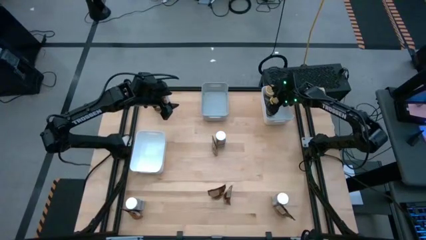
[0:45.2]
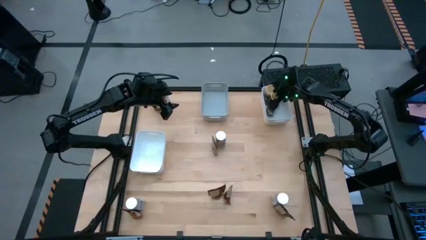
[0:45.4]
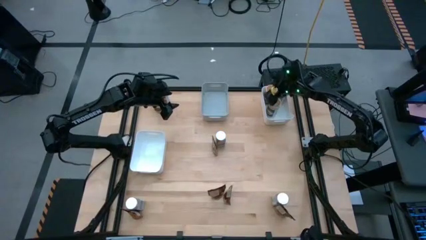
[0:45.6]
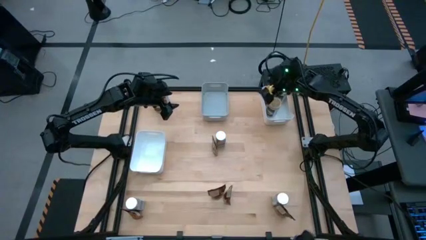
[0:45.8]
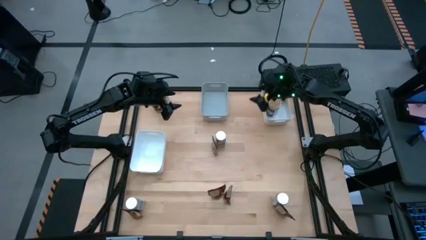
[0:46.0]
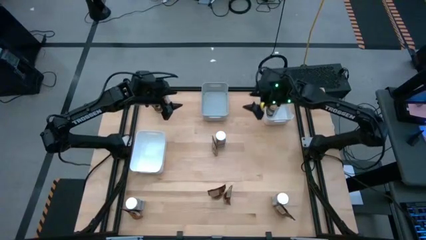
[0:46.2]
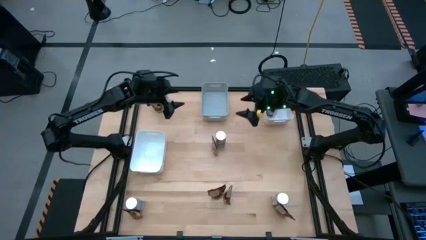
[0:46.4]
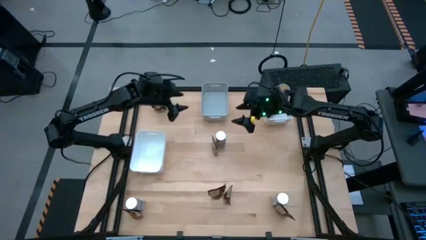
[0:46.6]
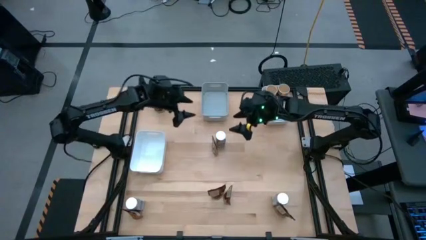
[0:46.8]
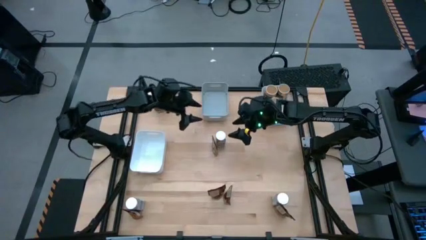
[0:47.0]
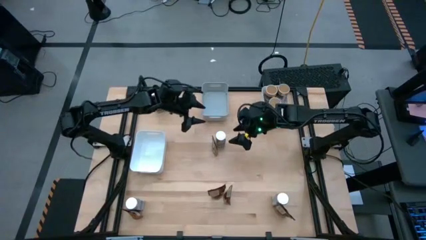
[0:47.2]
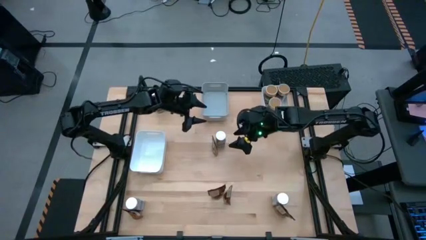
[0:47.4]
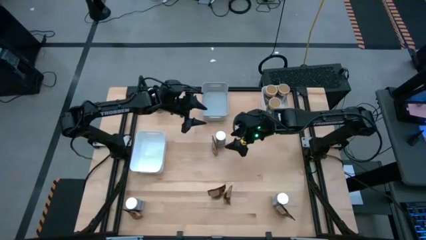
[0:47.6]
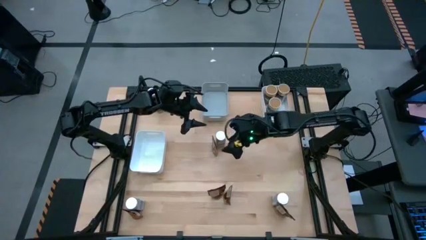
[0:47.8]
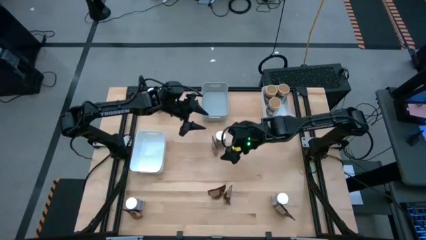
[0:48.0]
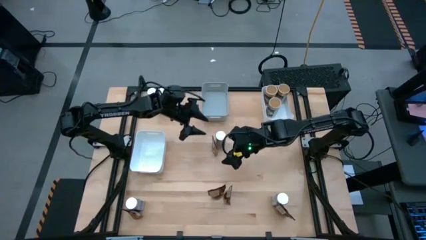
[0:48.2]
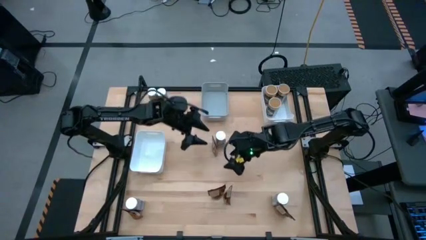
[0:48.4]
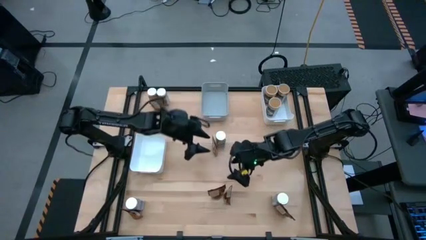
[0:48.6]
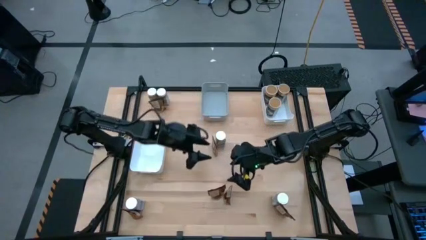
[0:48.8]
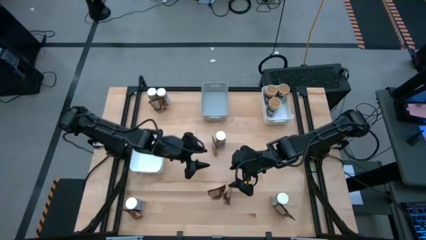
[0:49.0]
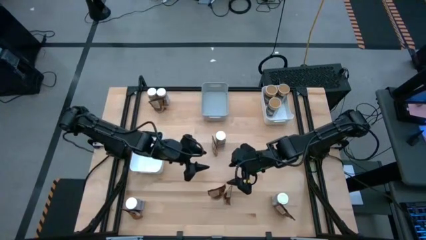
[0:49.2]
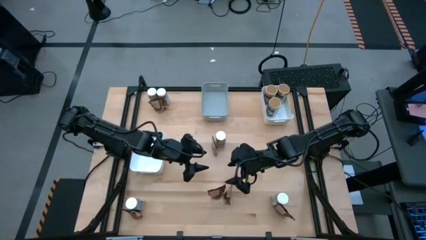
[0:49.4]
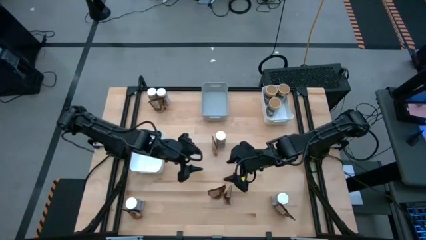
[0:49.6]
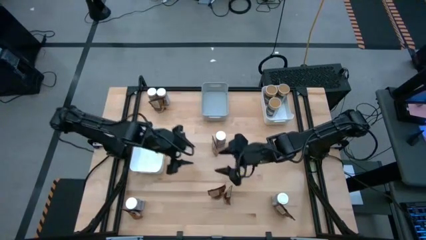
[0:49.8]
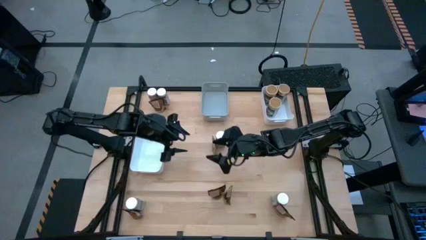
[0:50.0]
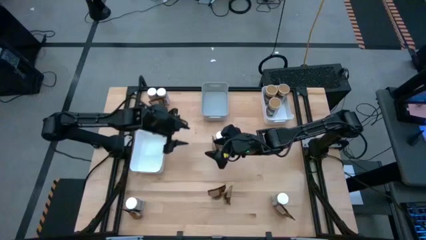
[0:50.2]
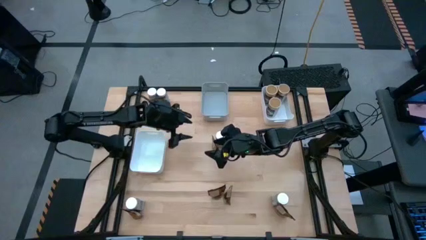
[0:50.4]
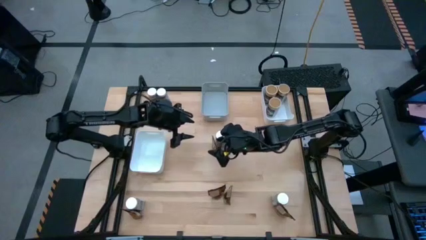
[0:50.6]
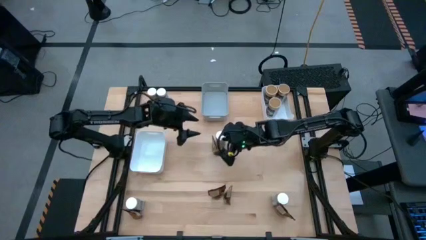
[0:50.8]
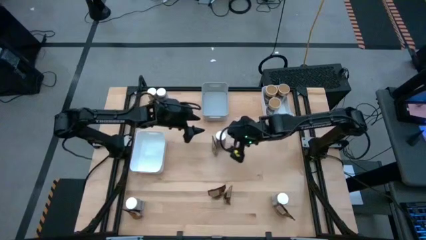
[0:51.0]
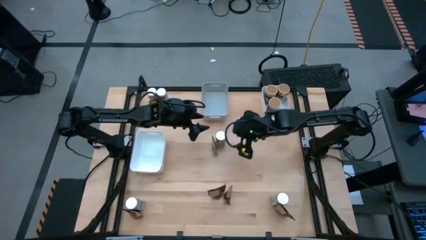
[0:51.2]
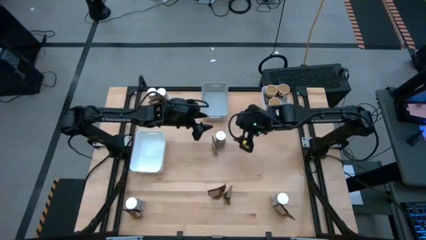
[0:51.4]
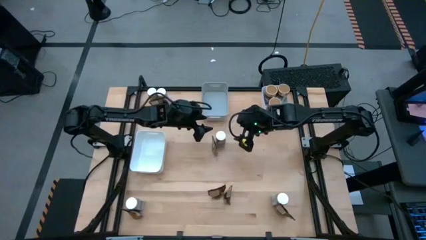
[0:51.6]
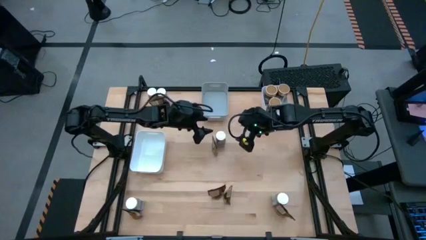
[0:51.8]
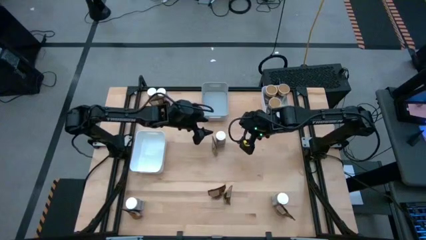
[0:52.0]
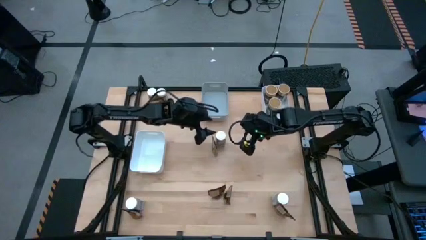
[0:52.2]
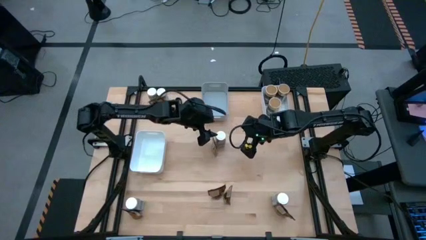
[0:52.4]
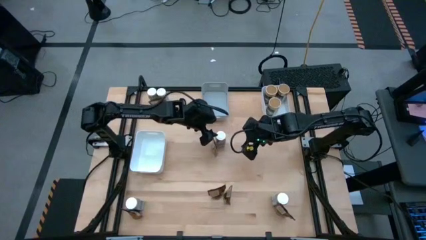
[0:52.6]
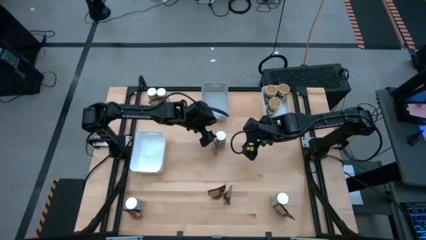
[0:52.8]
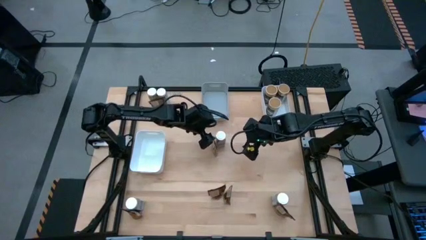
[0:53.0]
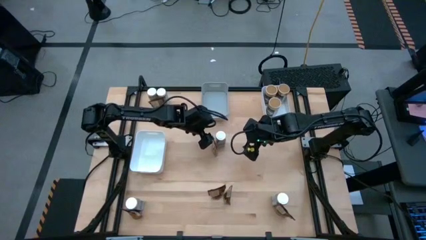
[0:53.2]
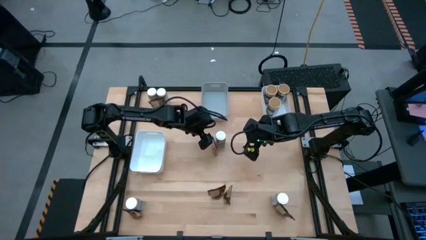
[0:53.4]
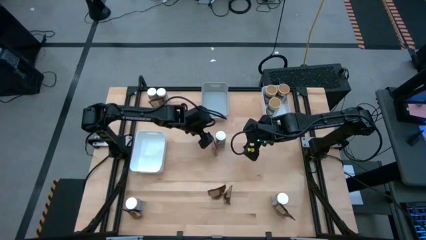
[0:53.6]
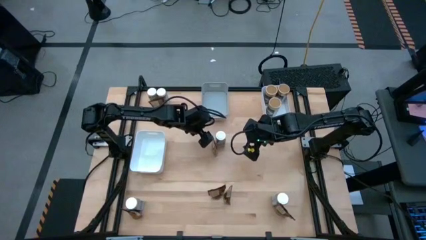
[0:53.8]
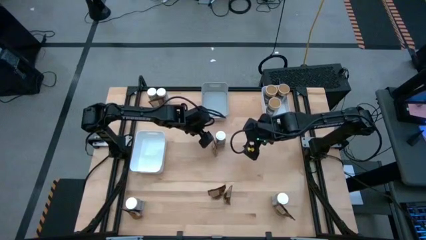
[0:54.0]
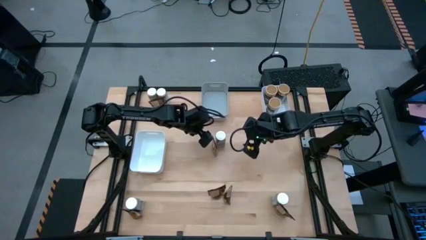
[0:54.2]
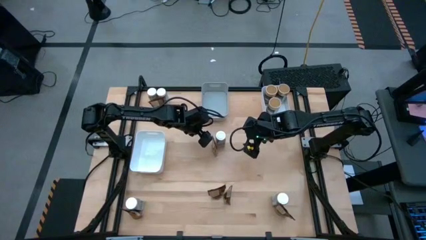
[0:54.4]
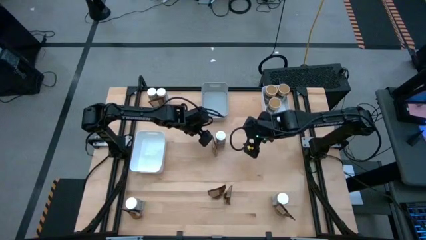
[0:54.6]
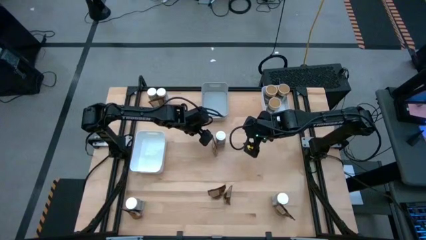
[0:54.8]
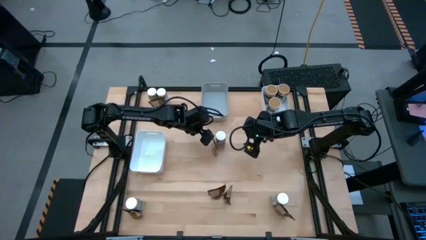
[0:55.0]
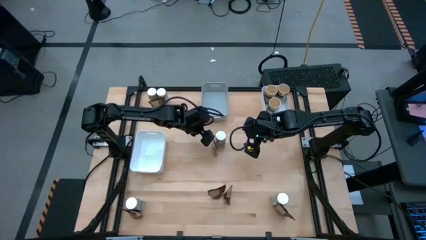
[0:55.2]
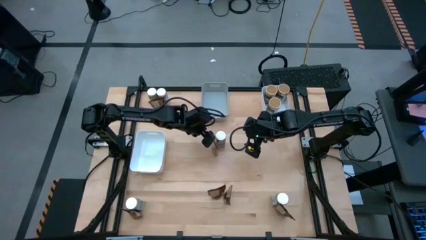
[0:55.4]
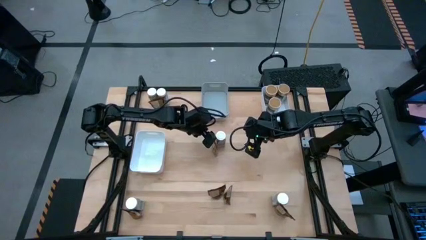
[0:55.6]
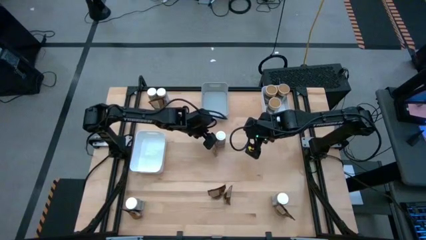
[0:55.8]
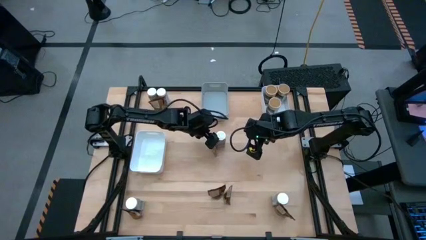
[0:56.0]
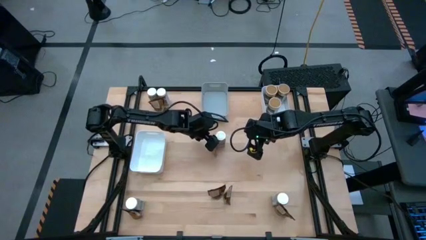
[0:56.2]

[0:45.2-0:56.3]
Task: Sort spices by type
Put the orange spice pack into the gray bin

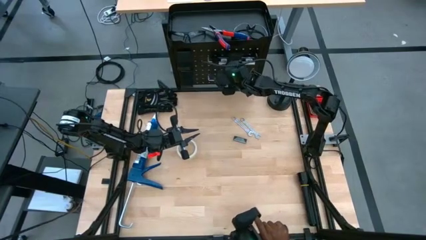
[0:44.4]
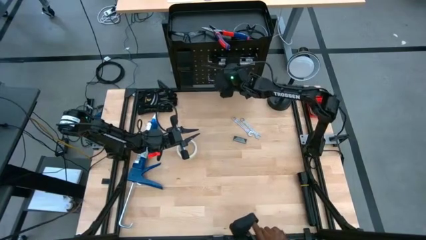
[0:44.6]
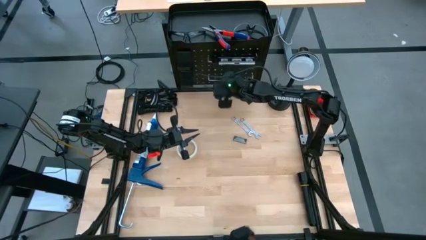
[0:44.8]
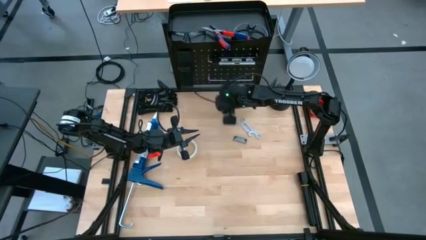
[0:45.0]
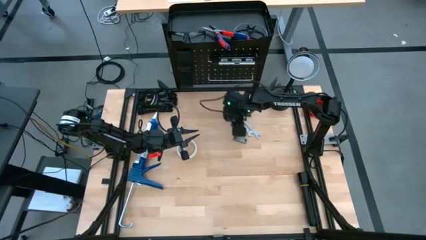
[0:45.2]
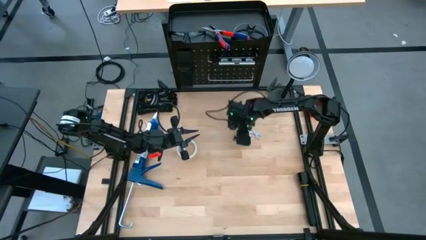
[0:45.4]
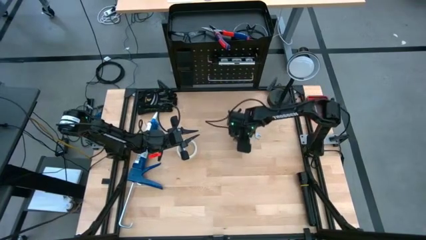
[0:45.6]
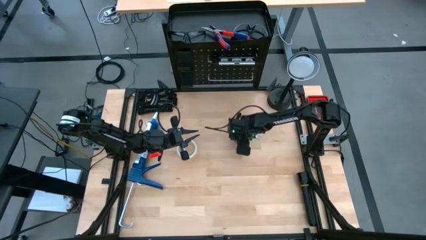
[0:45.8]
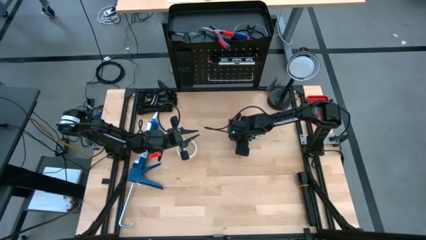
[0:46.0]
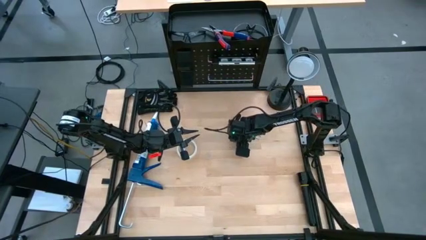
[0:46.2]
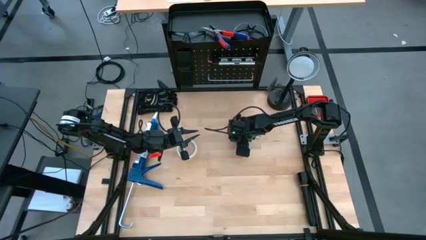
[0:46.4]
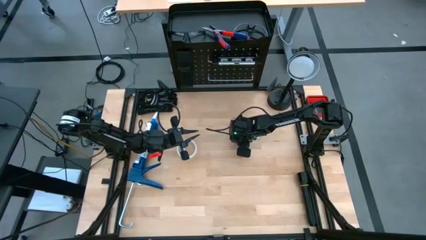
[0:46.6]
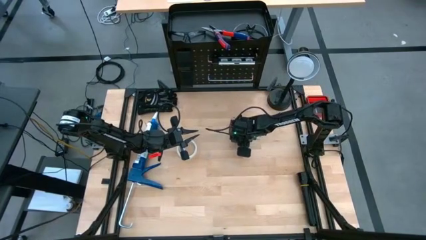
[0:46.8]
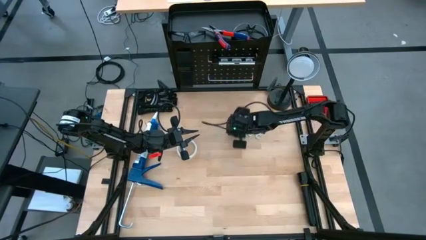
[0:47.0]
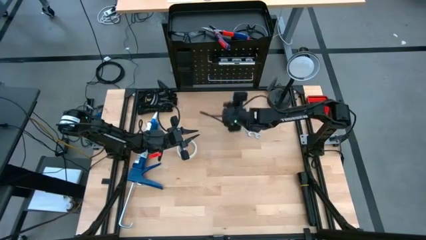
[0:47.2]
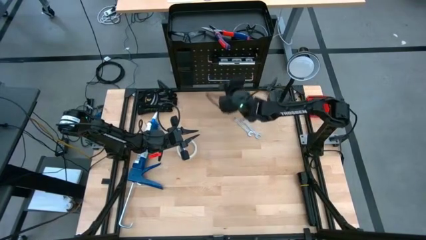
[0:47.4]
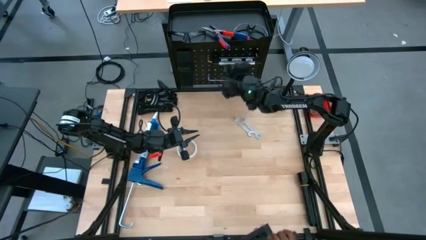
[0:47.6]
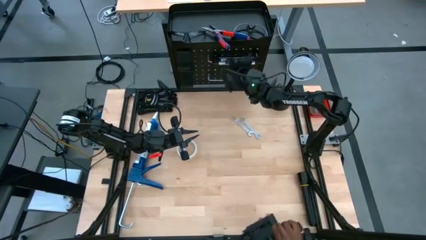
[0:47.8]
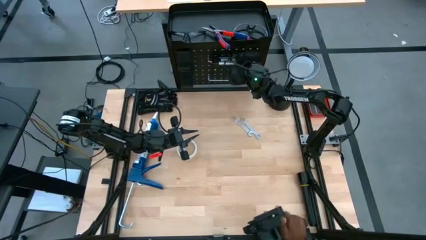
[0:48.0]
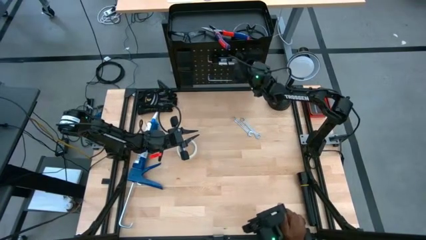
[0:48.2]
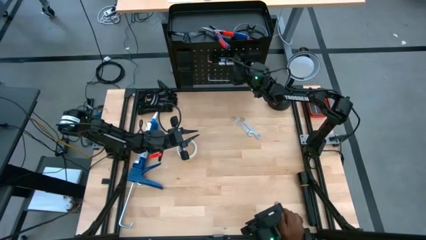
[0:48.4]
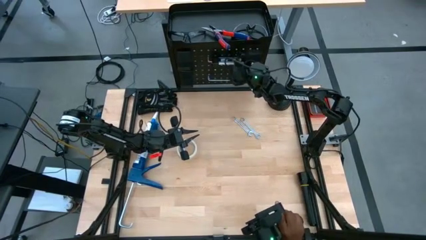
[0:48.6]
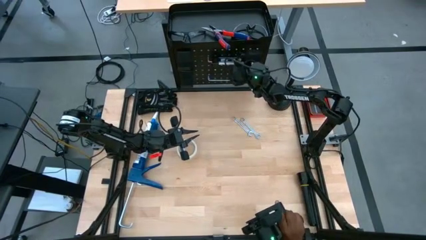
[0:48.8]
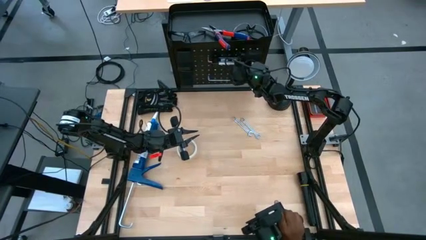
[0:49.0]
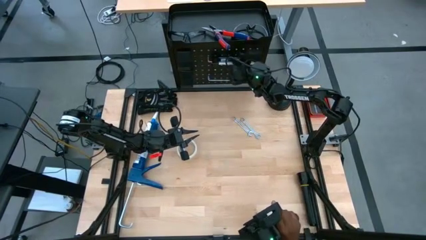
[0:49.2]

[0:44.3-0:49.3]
Task: Hang tools onto peg board
Put the black power balance handle on the peg board
